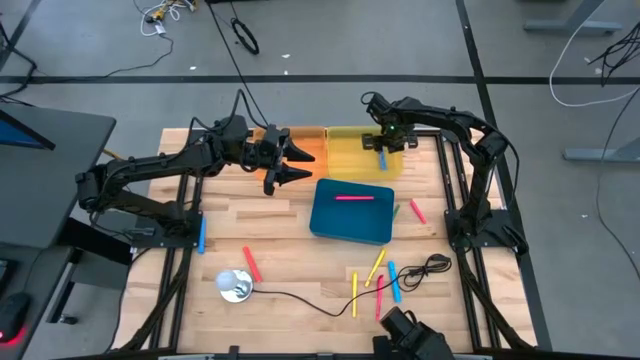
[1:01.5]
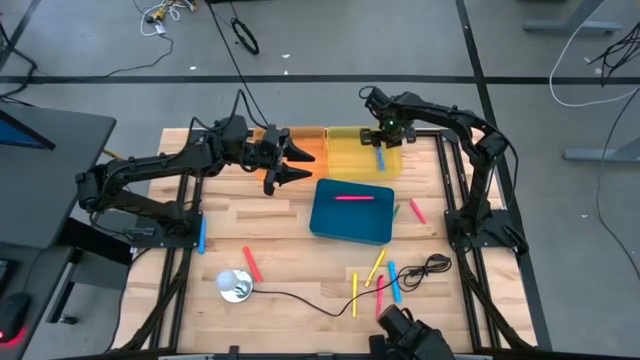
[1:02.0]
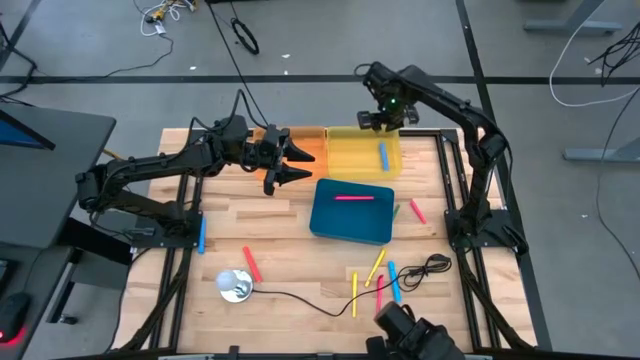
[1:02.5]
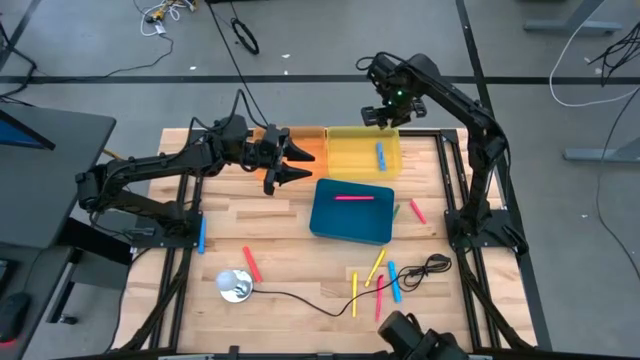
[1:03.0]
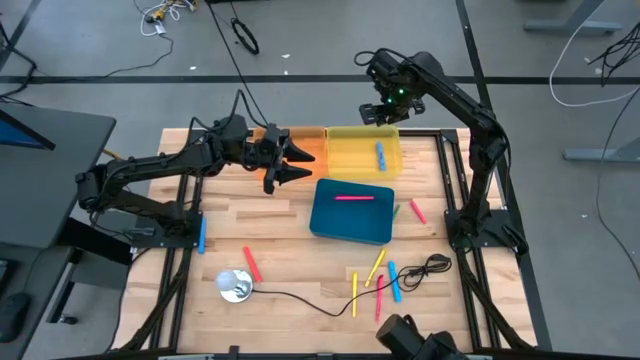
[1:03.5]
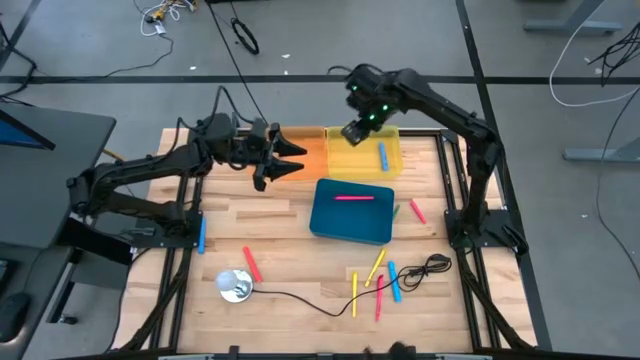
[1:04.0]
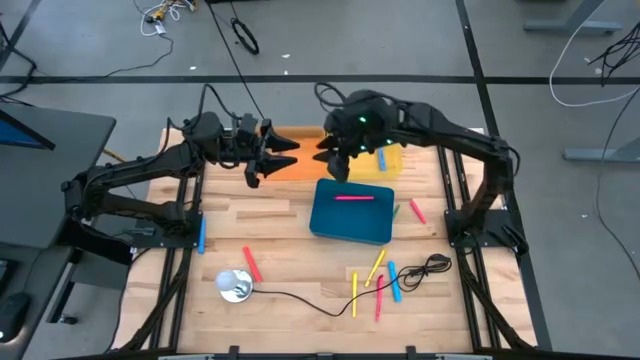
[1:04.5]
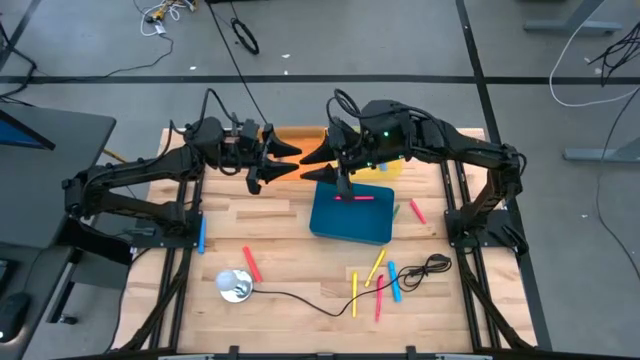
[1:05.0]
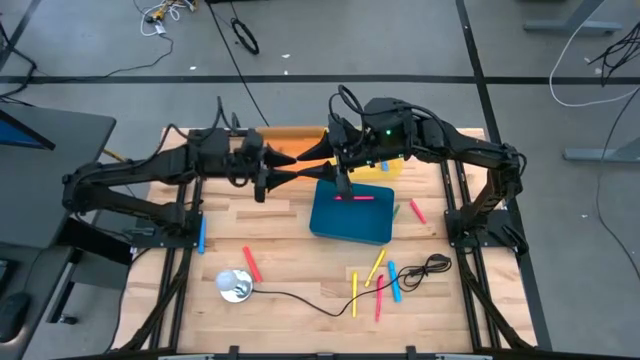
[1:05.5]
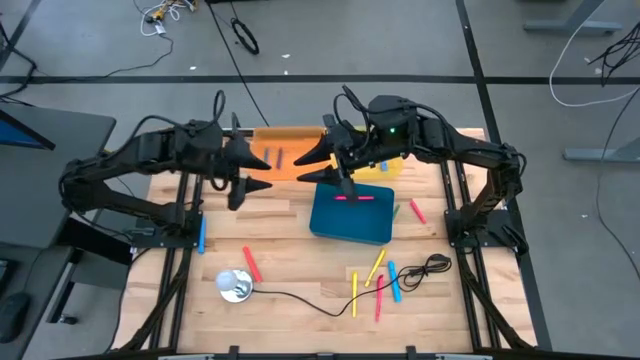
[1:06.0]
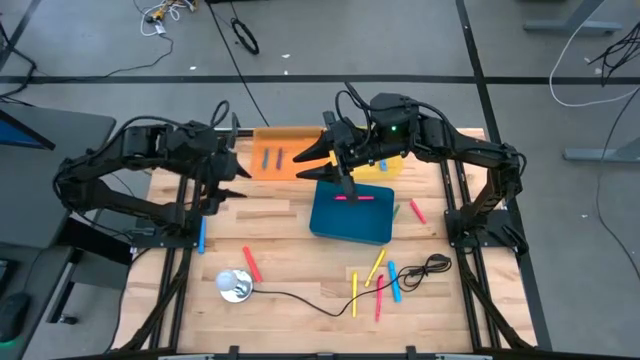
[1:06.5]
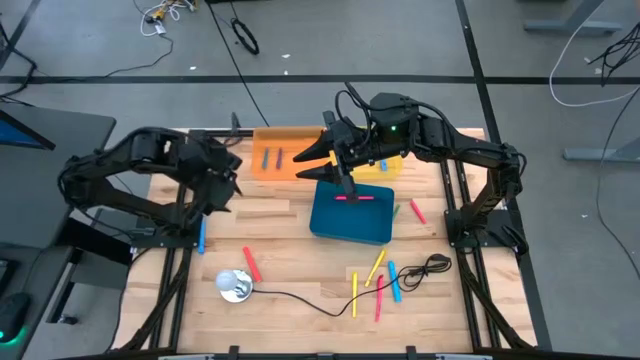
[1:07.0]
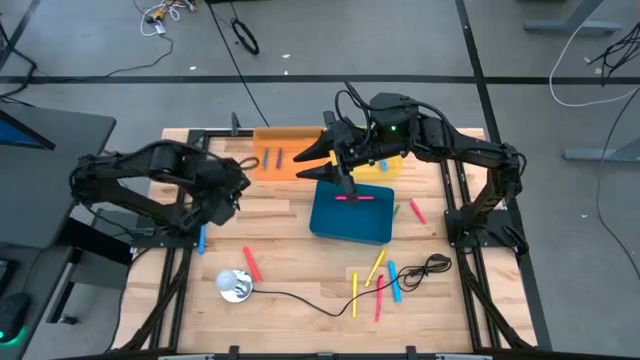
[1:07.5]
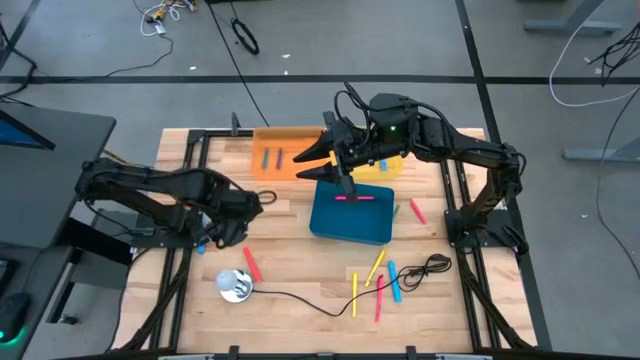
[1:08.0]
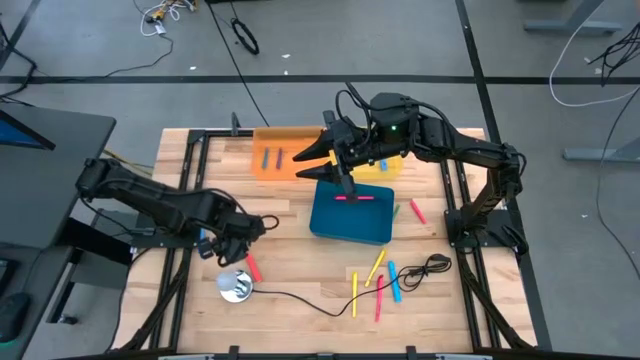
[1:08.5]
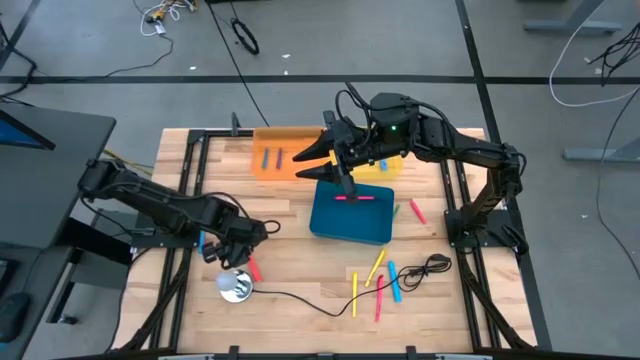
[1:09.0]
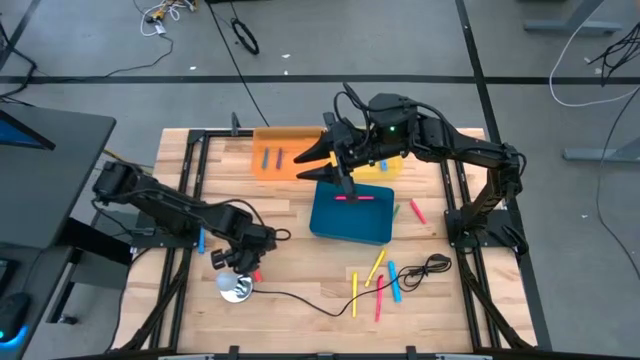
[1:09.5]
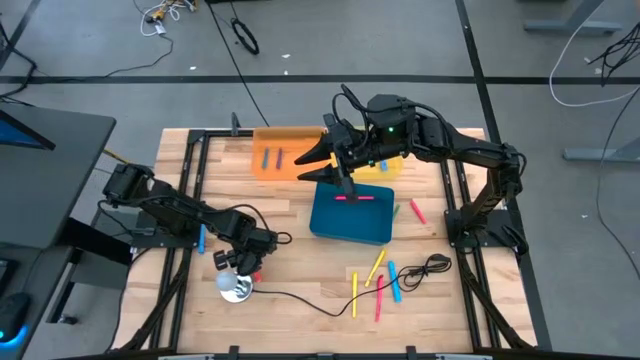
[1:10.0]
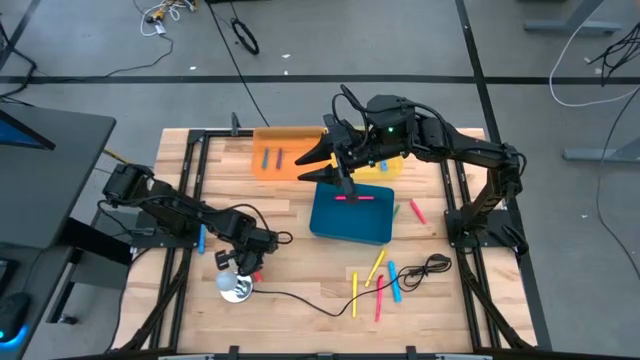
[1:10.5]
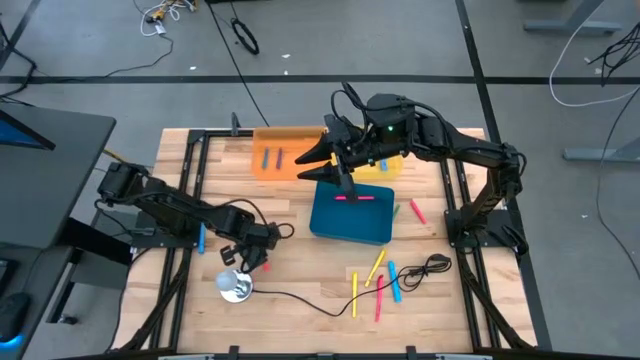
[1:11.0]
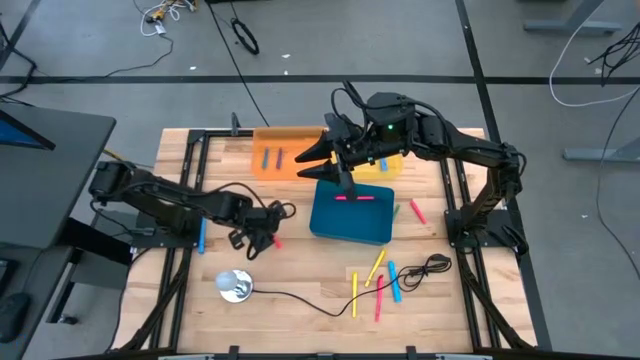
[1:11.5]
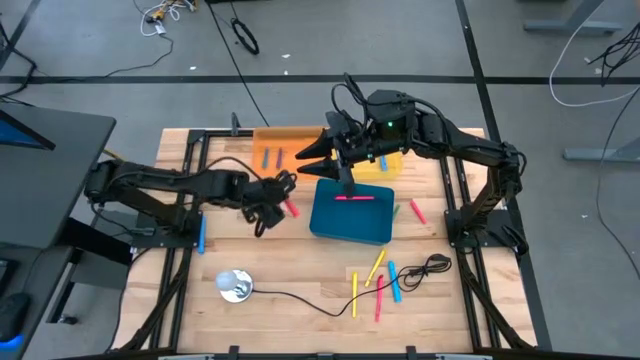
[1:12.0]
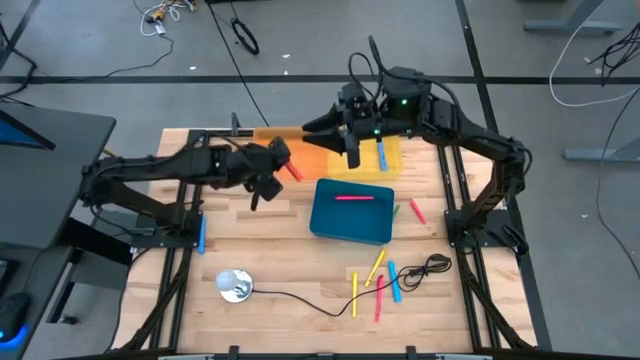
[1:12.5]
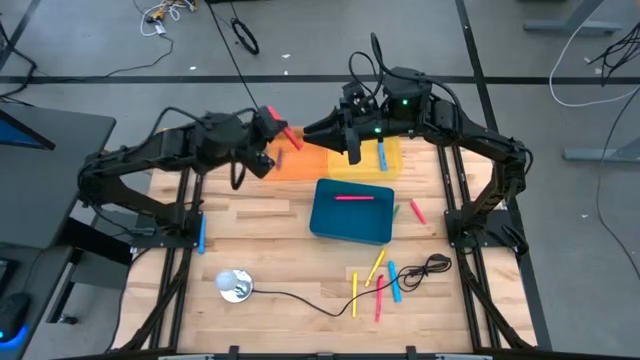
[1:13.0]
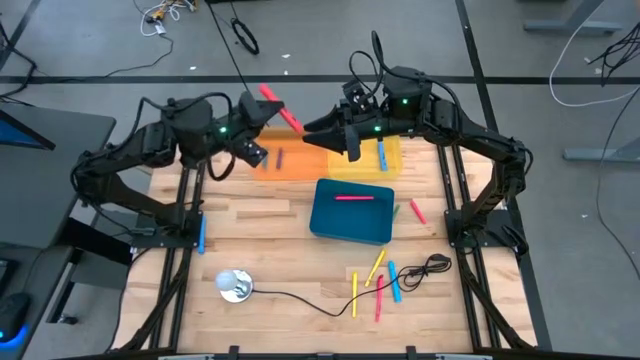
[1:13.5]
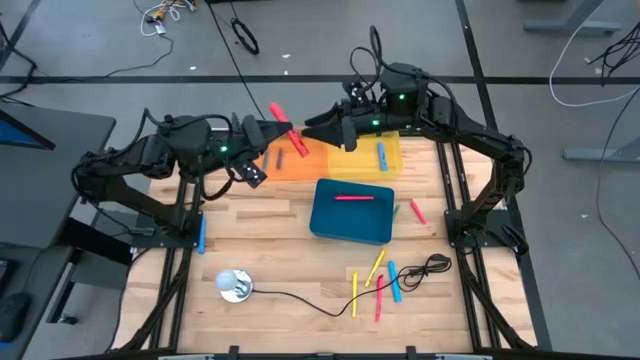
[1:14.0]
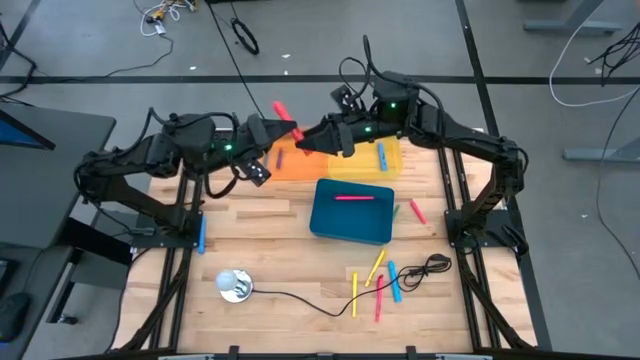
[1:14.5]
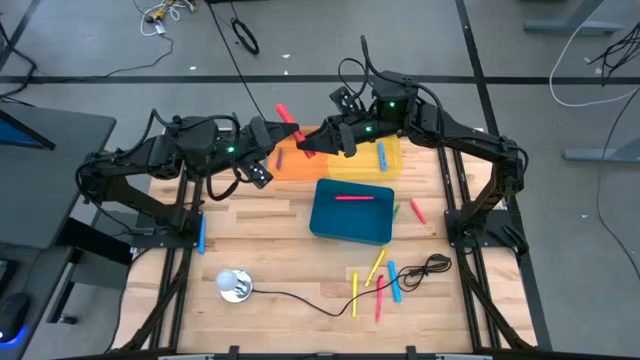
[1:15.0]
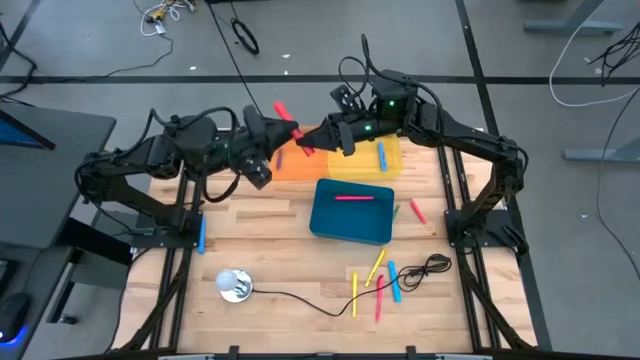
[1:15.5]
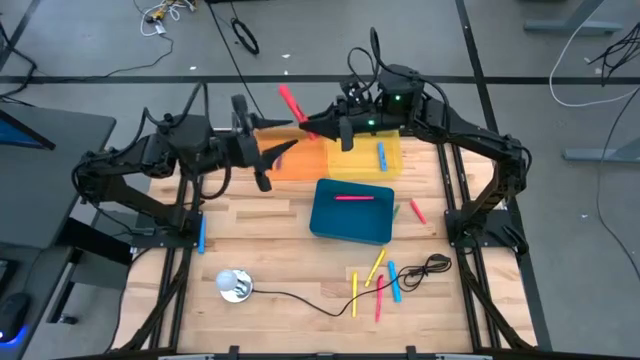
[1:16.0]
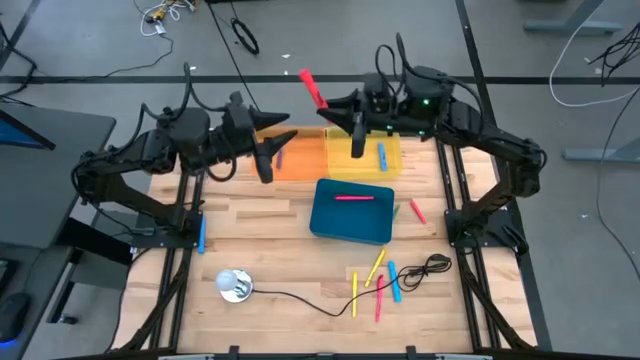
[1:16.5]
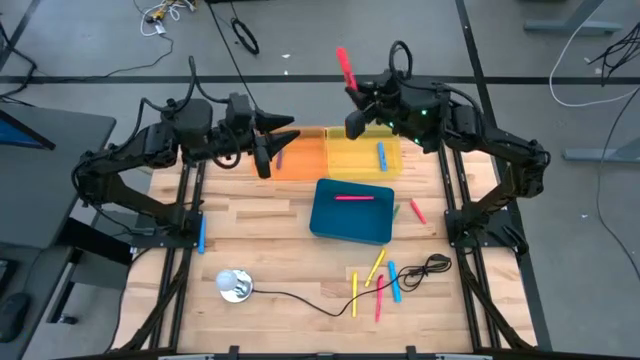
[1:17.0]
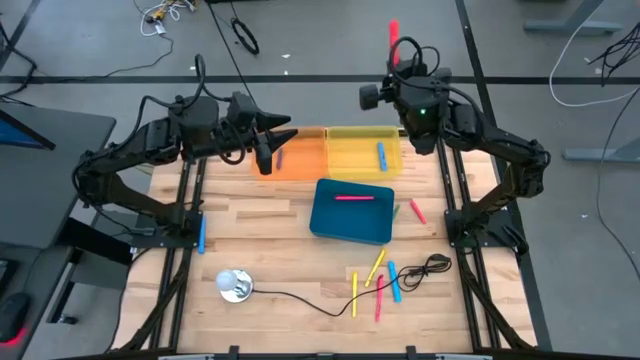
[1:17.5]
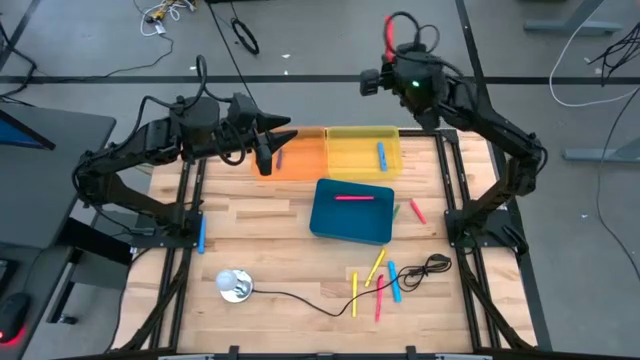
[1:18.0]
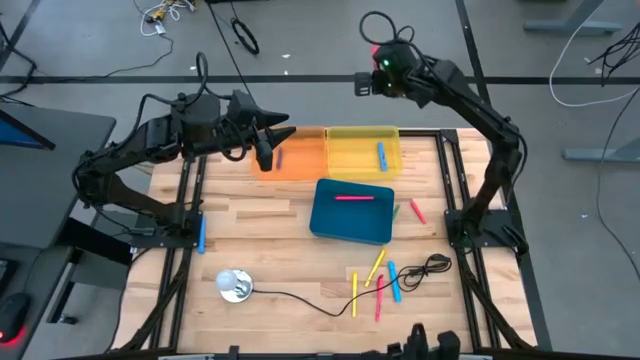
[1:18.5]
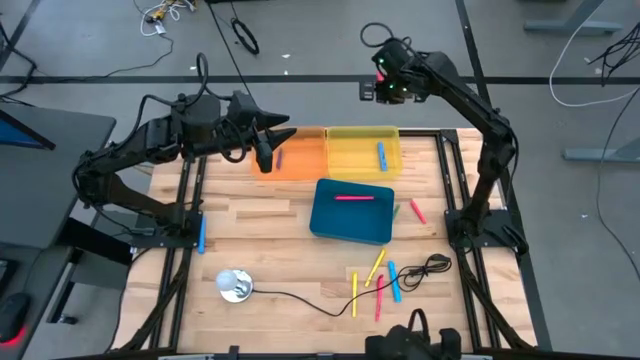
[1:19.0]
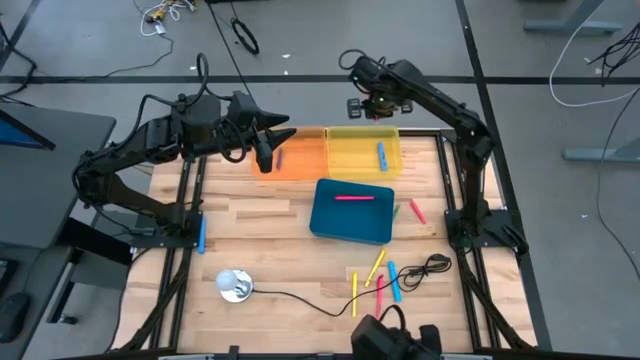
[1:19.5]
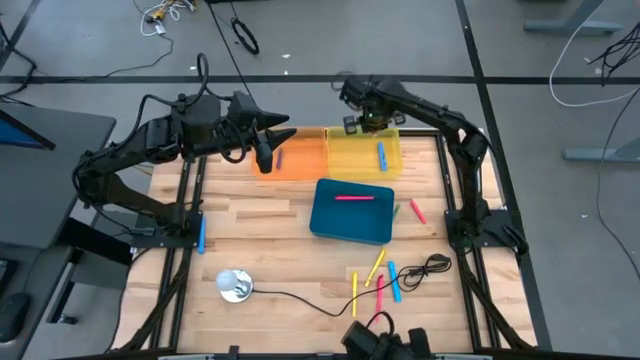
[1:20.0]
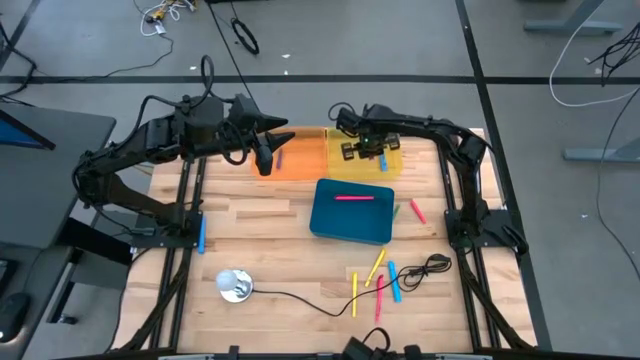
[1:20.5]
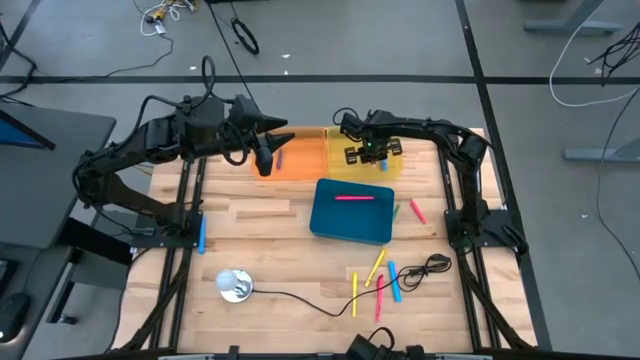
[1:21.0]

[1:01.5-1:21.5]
Task: Pick & Place Markers
Put the pink marker into the yellow transparent bin

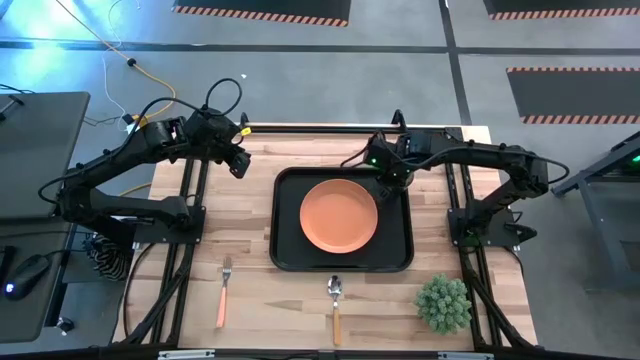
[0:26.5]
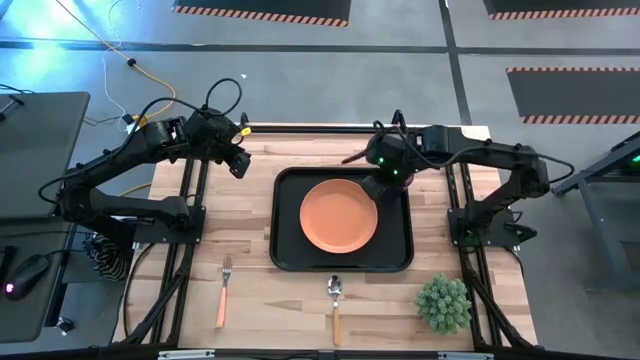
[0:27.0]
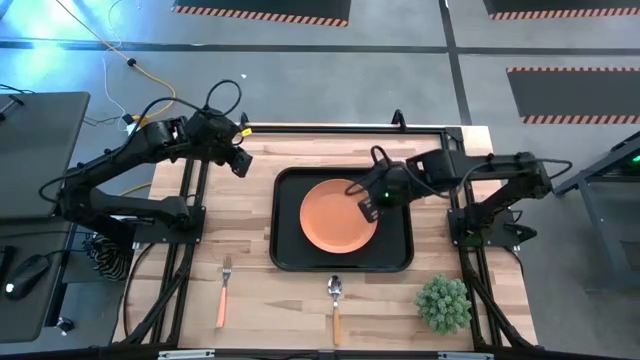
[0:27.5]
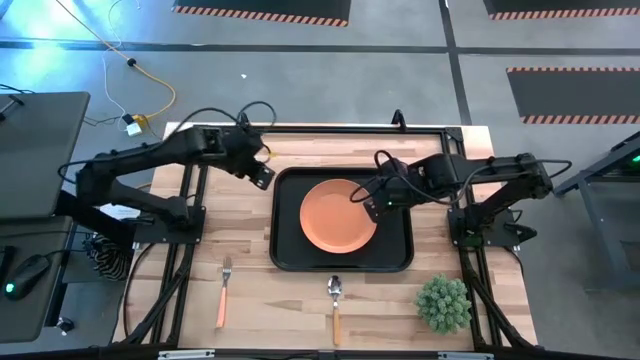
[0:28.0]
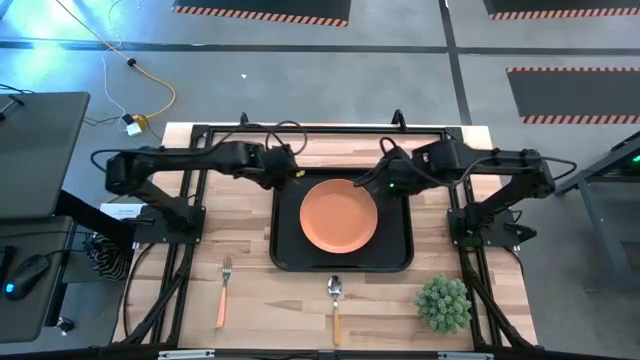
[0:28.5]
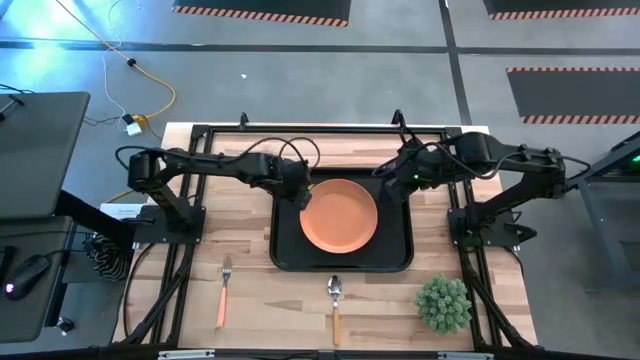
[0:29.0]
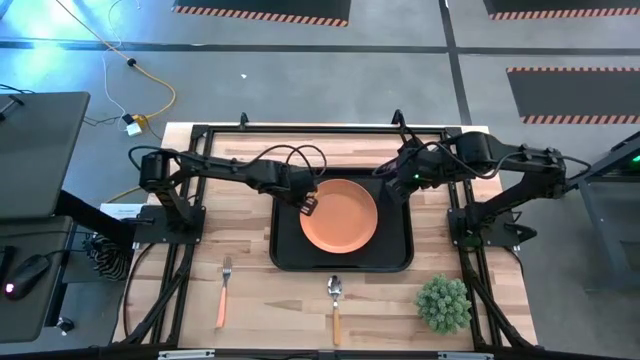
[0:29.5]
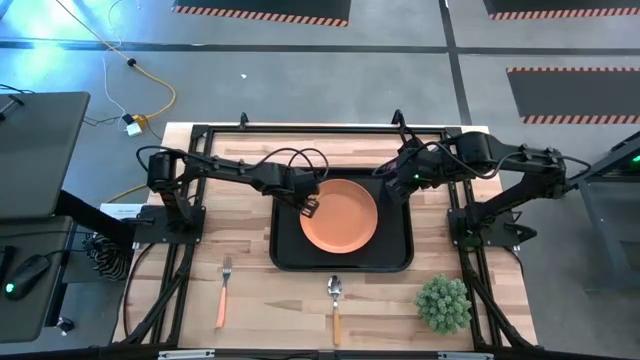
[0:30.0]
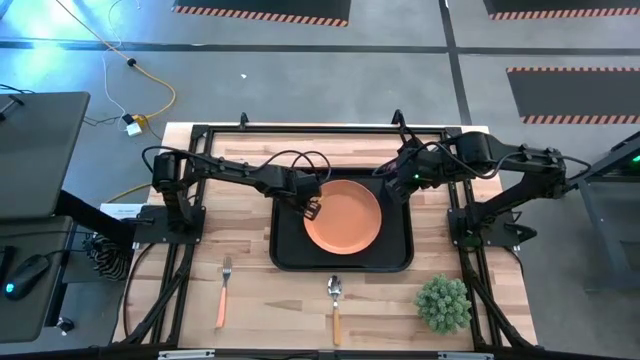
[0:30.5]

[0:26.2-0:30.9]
Task: Pick and place plate/cup/fork/spoon on tray
Adjust the orange plate
